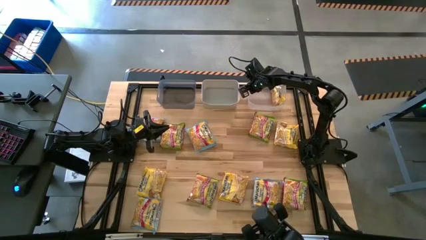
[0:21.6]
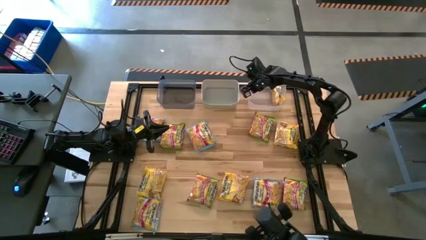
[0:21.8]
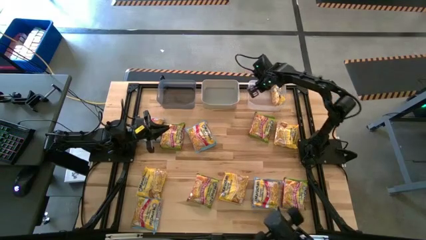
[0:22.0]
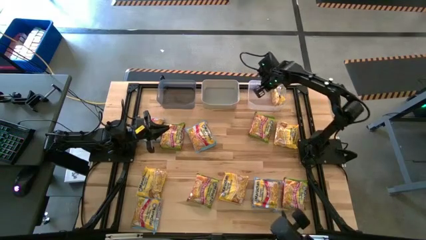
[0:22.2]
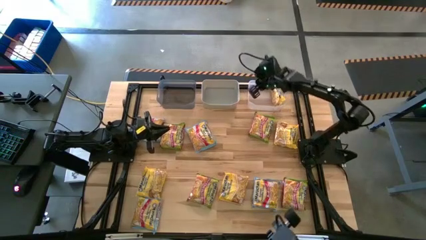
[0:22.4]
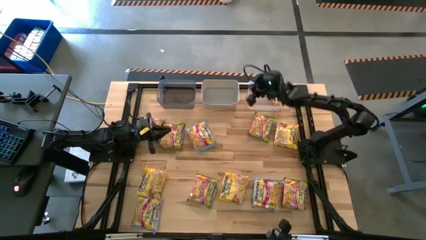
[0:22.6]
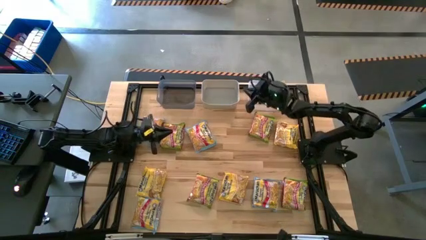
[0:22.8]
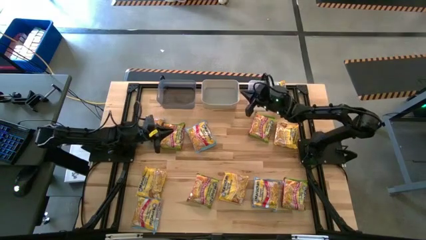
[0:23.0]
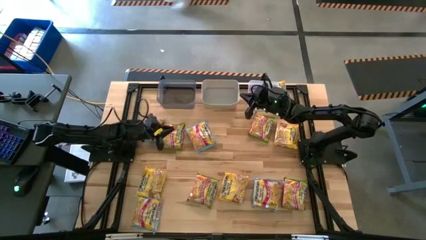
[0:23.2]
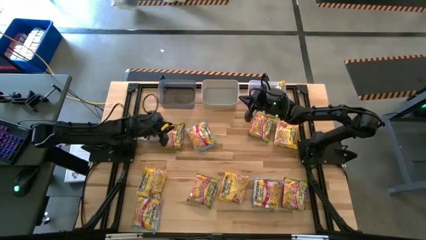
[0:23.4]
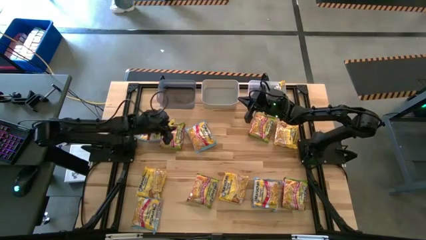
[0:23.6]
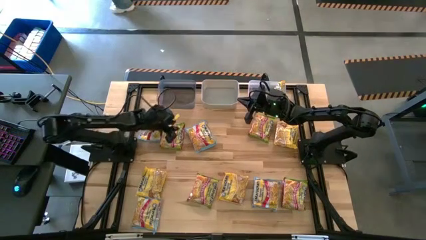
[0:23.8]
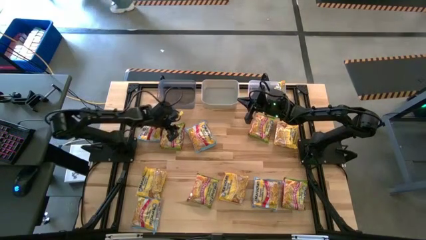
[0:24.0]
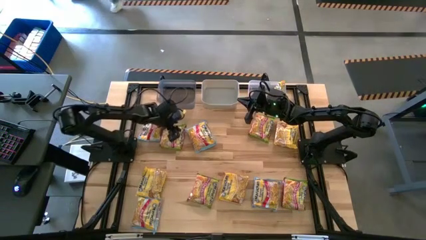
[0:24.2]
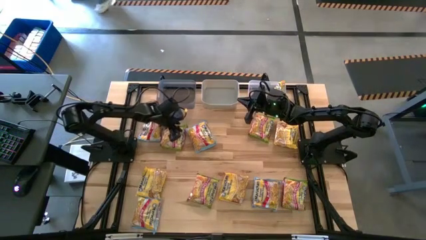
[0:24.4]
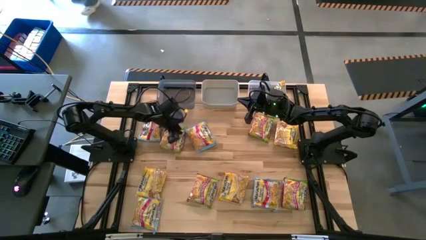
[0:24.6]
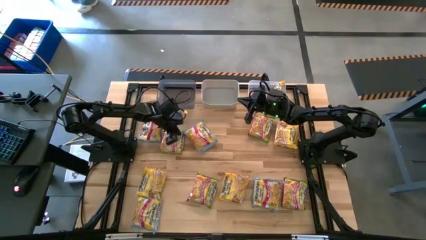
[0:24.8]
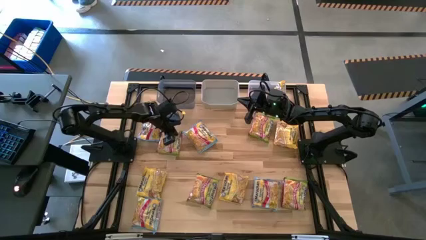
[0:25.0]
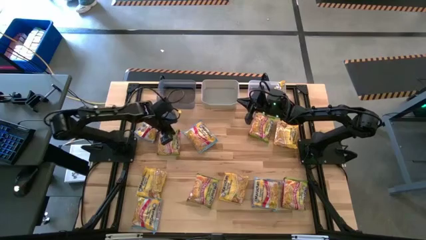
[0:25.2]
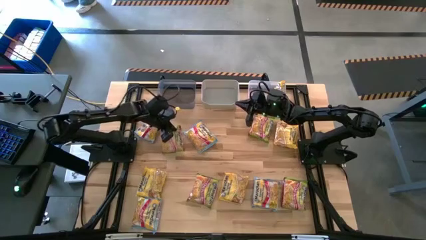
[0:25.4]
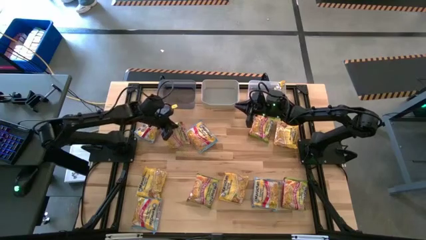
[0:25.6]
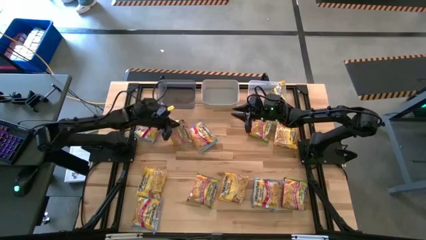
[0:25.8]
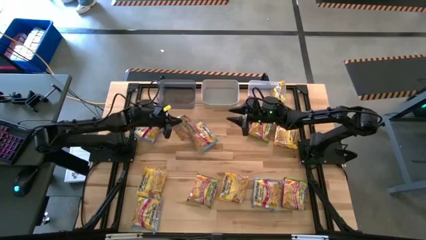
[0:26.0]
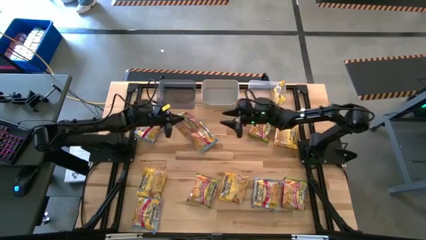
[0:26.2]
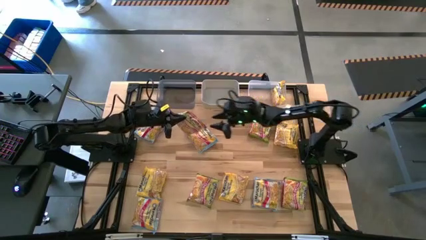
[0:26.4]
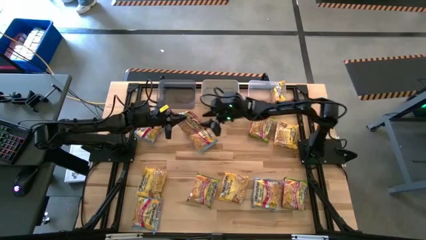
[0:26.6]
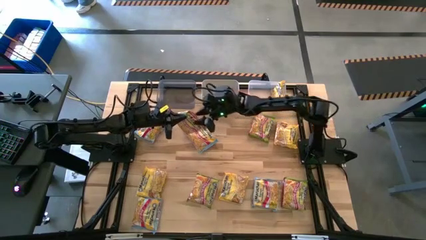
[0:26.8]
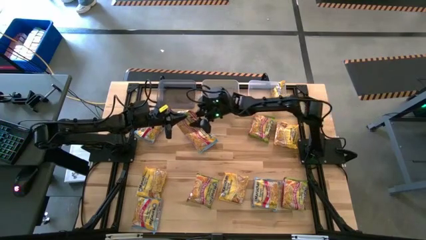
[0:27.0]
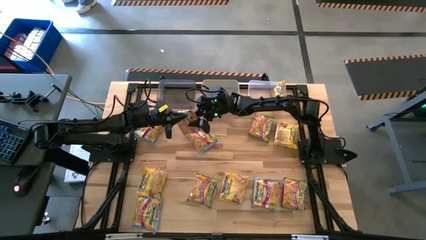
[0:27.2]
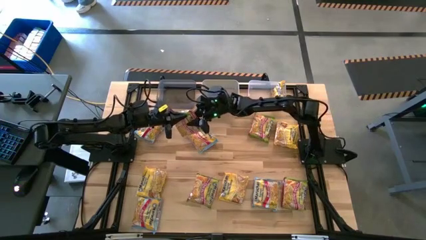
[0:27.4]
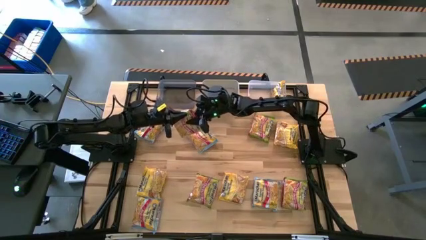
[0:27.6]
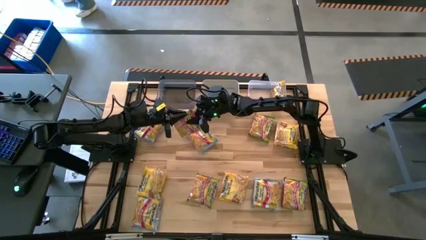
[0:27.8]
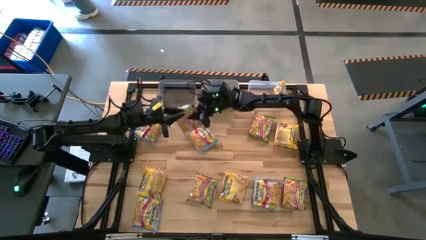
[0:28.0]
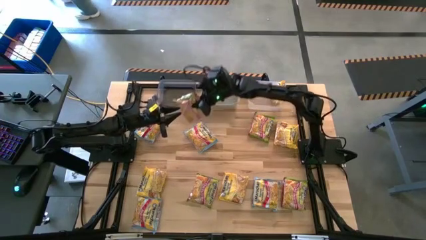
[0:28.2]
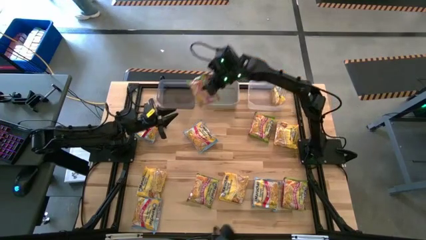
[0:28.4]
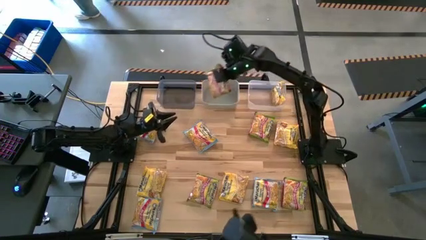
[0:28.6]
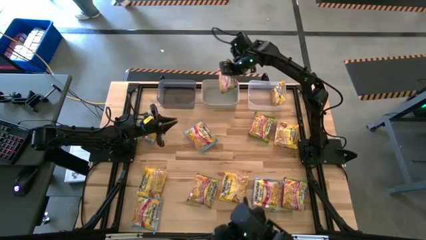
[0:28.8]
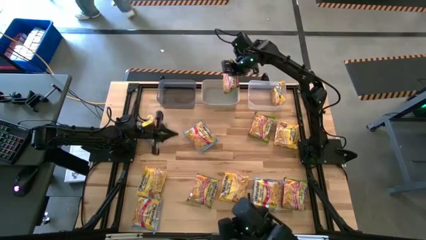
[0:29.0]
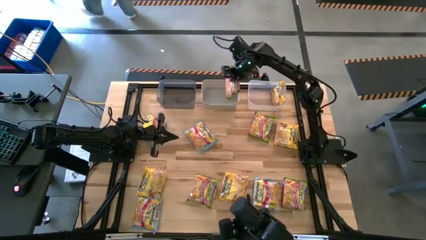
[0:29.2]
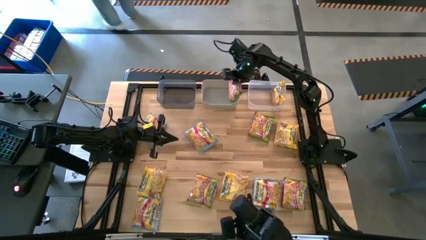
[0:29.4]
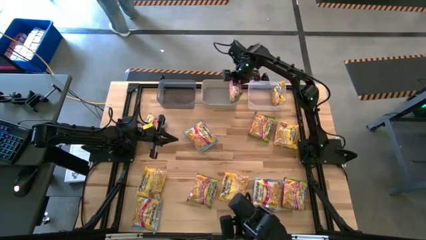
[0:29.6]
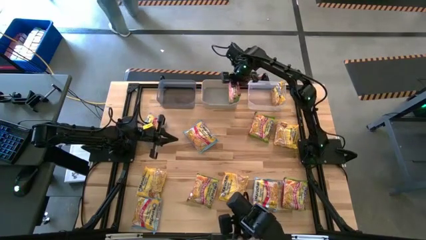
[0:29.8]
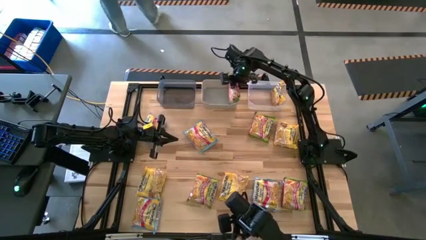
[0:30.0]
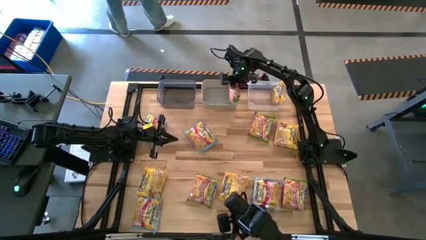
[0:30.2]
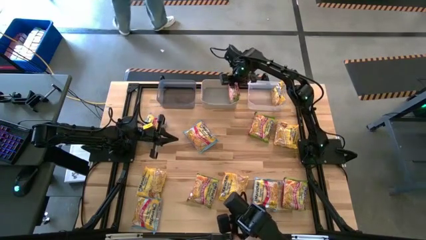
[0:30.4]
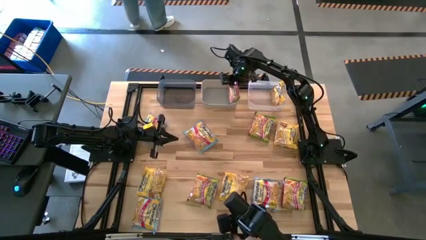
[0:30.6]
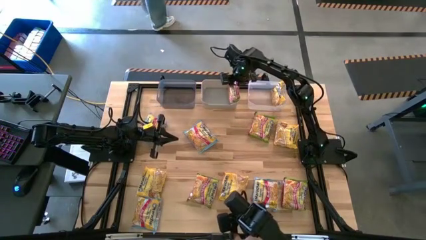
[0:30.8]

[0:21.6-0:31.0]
Task: Sort Maruchan noodles
Put the green noodle pack into the gray bin

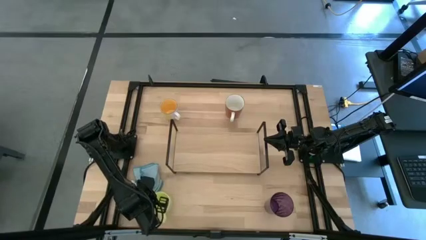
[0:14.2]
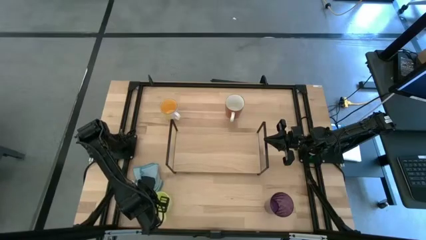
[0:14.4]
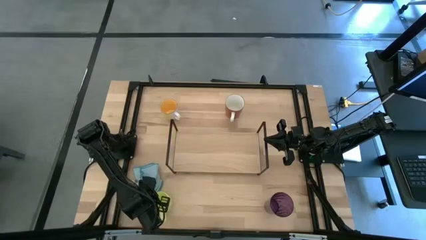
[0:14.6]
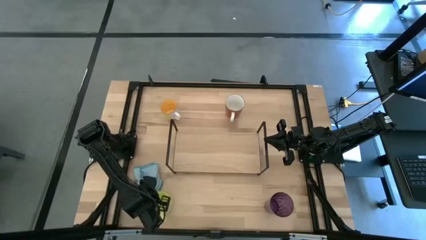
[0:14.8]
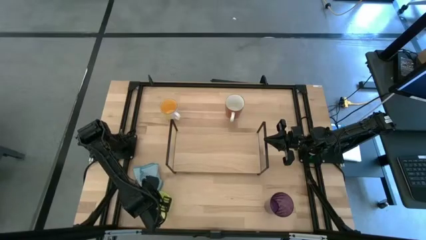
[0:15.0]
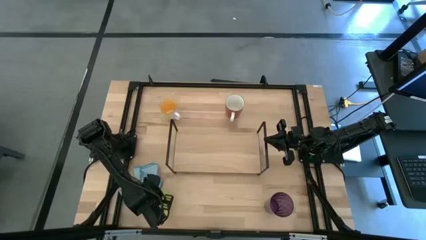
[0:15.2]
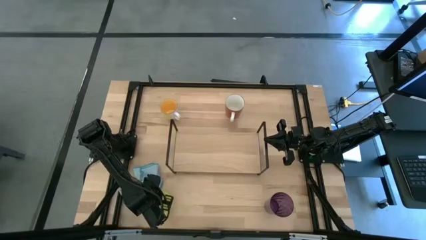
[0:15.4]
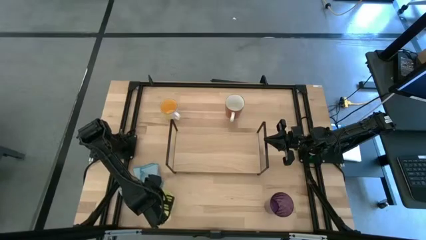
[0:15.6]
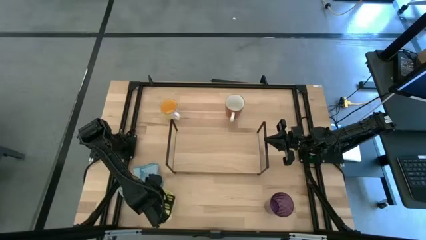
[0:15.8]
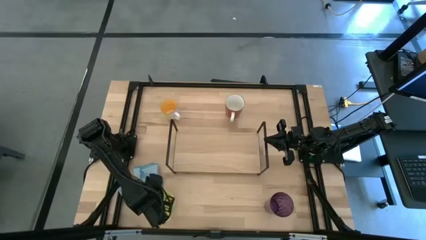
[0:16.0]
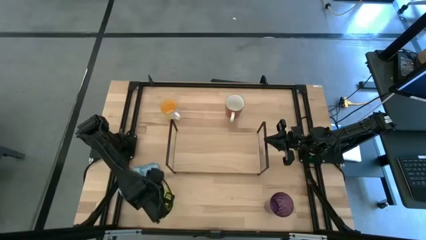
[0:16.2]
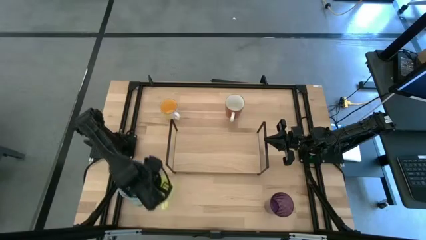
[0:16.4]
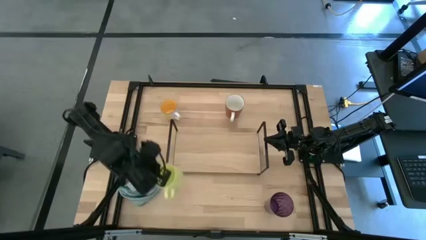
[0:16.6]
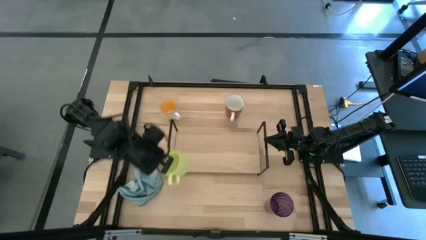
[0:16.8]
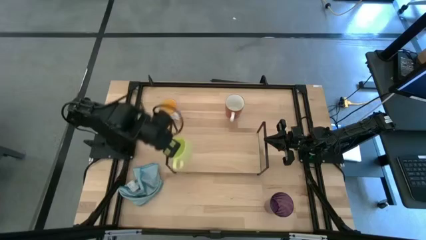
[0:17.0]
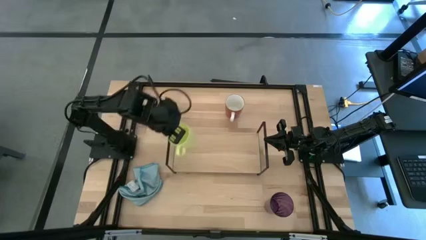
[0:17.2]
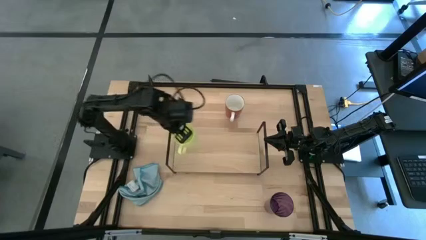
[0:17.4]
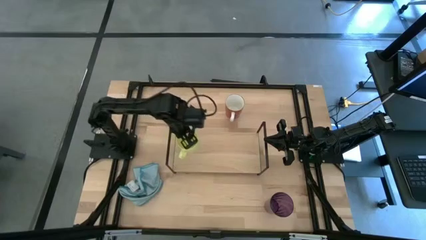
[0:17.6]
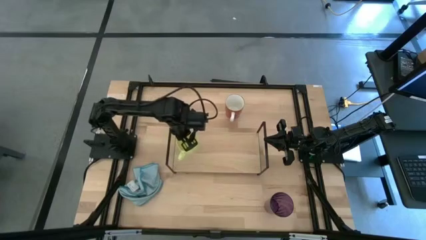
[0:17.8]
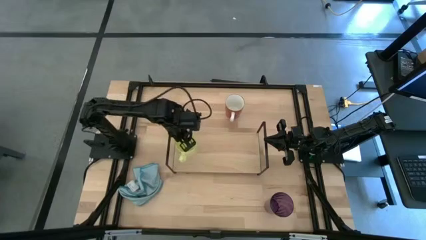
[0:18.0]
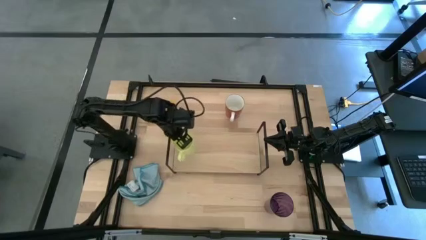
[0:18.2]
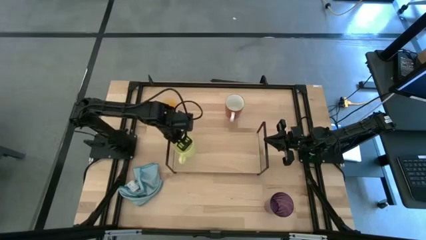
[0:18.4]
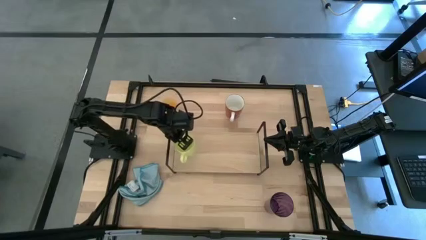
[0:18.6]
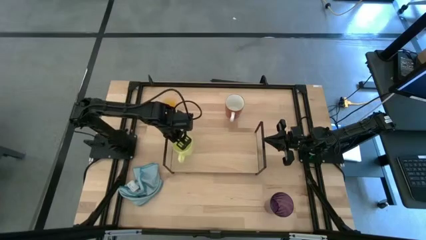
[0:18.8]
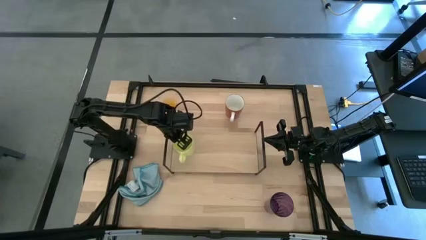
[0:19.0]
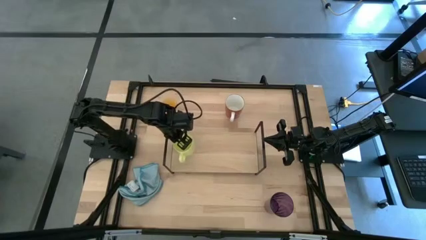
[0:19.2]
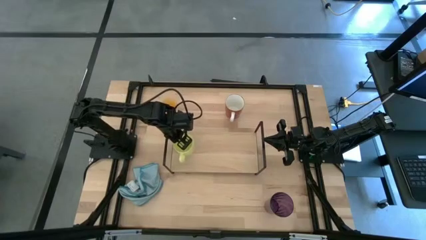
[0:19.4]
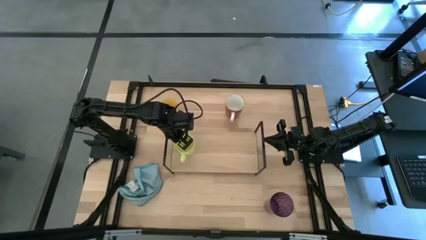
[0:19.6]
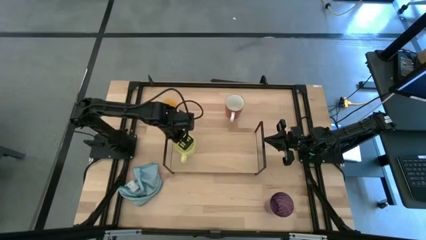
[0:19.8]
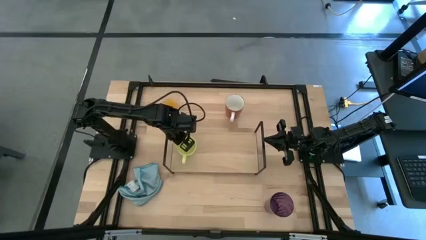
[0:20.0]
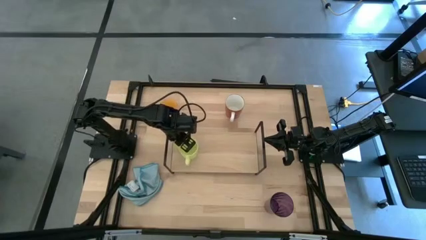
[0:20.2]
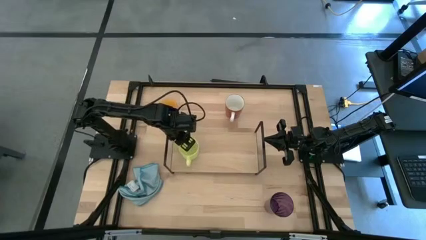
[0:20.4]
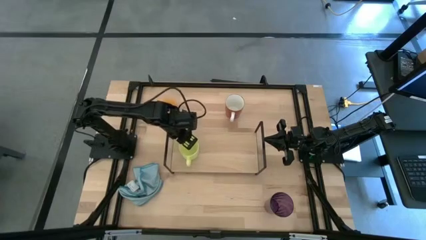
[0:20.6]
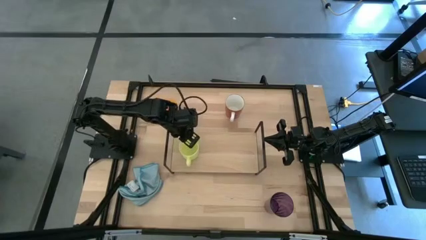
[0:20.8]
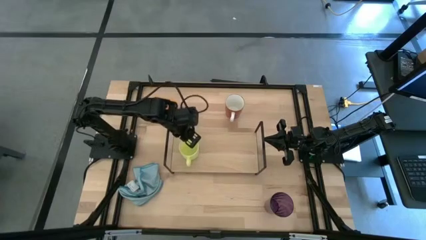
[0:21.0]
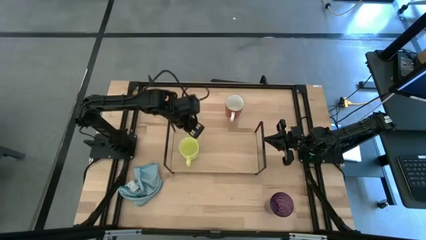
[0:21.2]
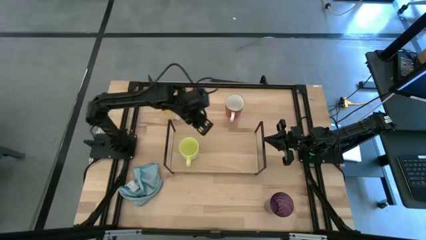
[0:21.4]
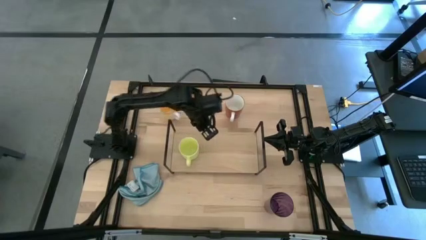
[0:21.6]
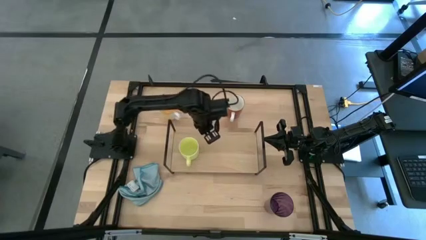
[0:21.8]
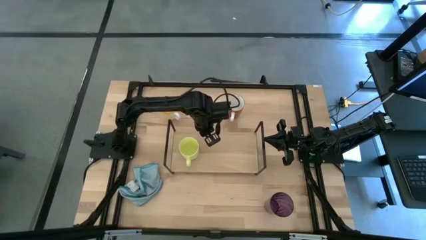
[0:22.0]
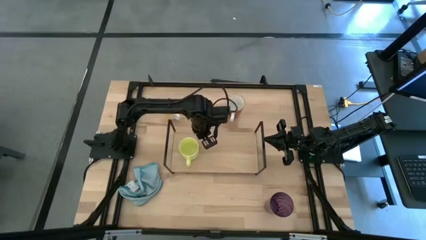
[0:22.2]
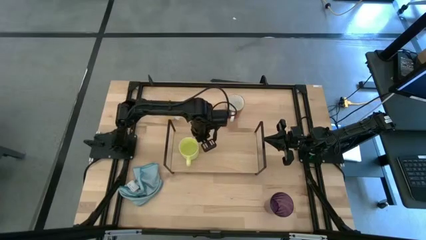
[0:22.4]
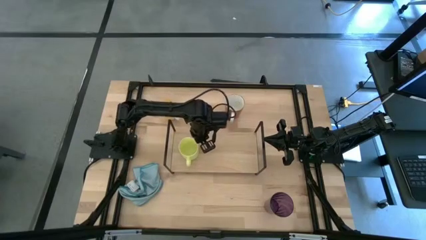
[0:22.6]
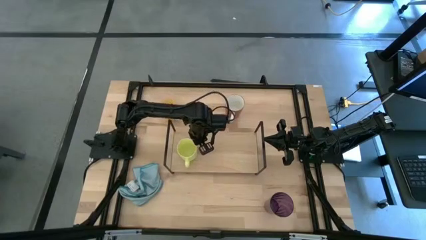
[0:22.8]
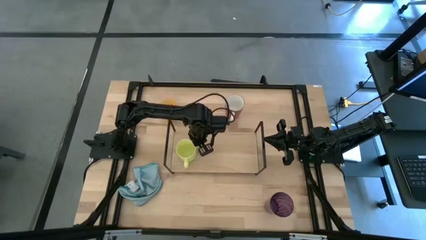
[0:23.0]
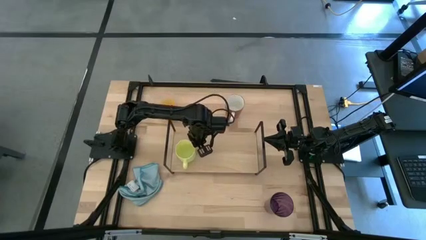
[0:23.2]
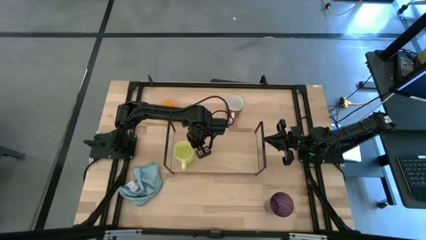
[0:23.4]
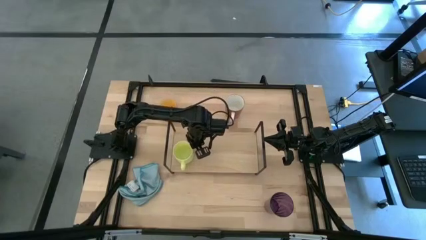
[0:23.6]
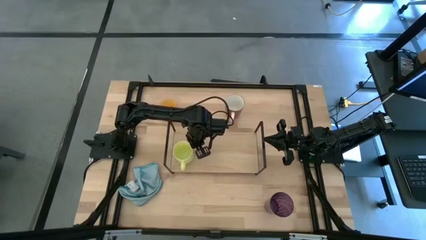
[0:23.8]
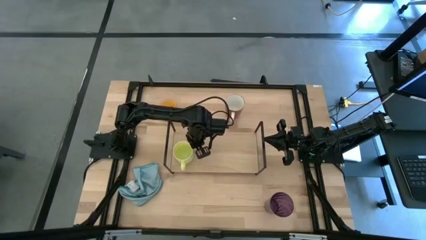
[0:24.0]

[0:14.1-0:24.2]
Task: Stack small to large cups/mugs on shelf
Put the green cup on the shelf
